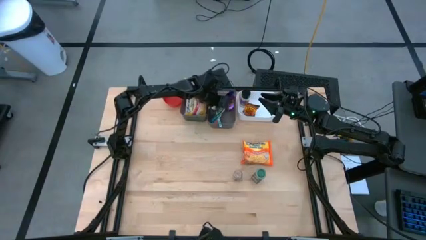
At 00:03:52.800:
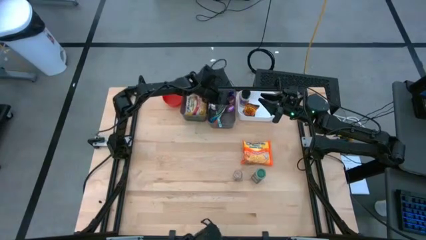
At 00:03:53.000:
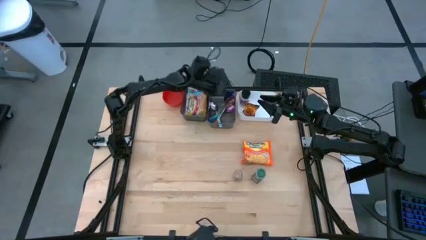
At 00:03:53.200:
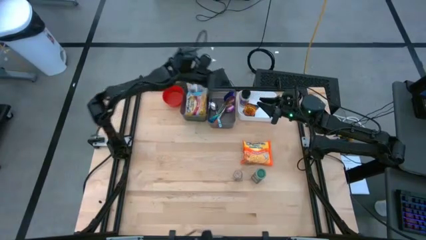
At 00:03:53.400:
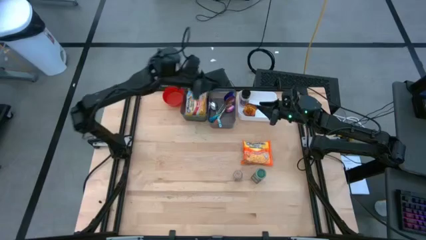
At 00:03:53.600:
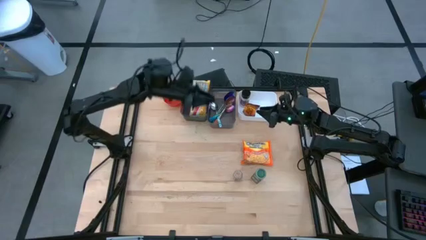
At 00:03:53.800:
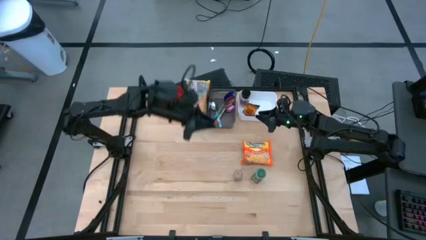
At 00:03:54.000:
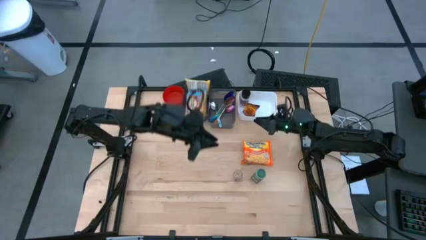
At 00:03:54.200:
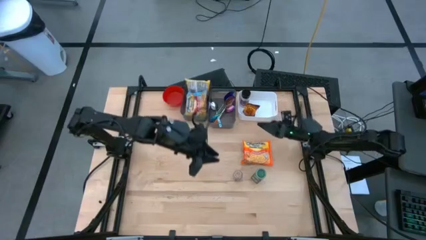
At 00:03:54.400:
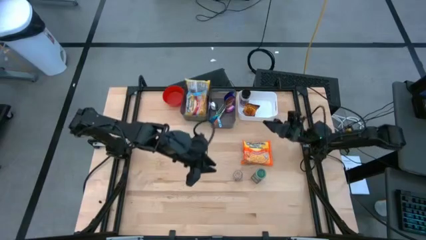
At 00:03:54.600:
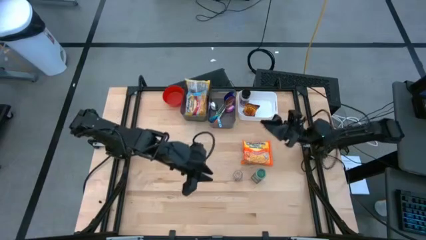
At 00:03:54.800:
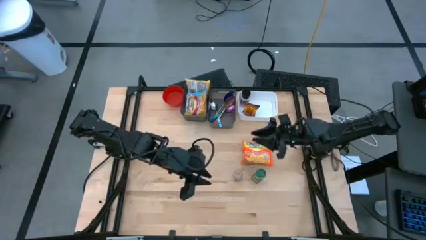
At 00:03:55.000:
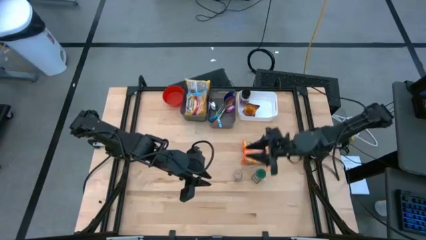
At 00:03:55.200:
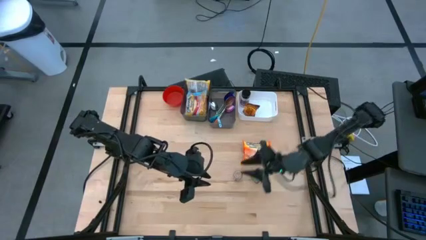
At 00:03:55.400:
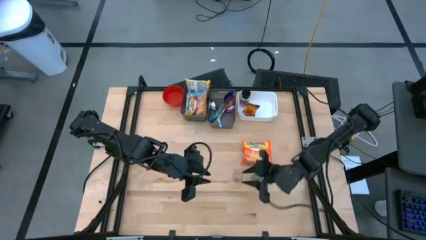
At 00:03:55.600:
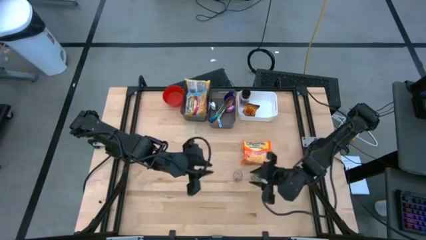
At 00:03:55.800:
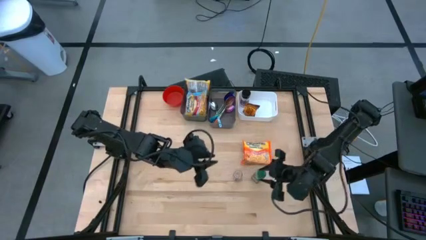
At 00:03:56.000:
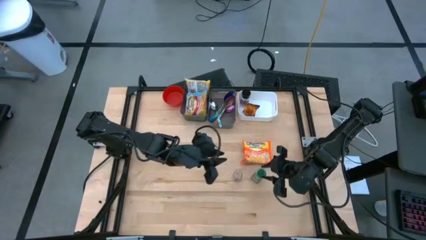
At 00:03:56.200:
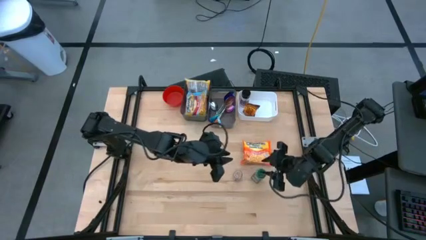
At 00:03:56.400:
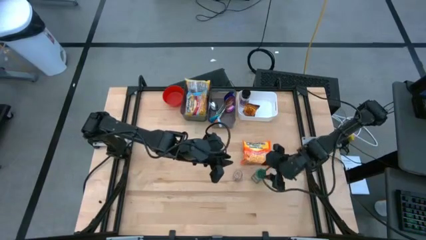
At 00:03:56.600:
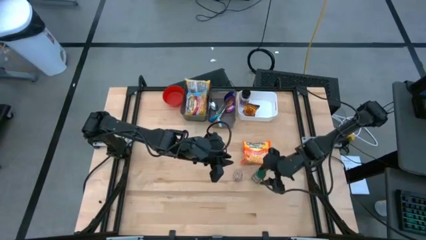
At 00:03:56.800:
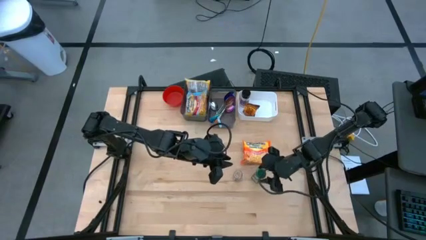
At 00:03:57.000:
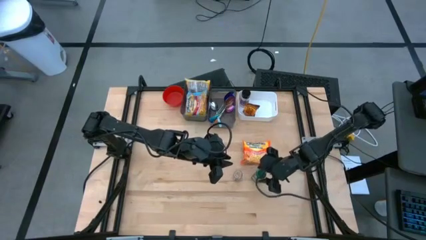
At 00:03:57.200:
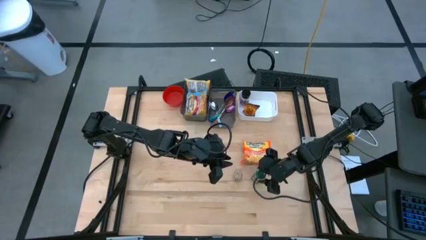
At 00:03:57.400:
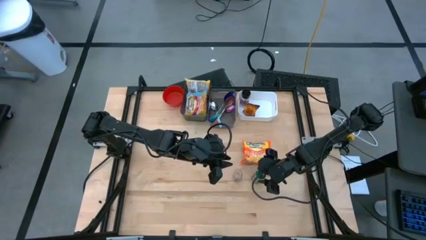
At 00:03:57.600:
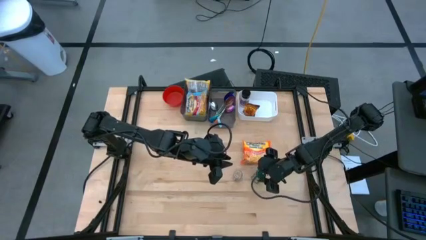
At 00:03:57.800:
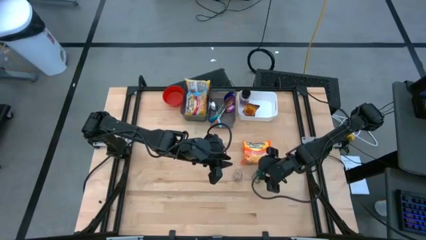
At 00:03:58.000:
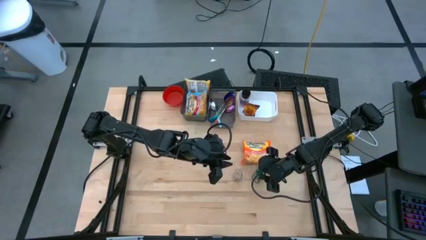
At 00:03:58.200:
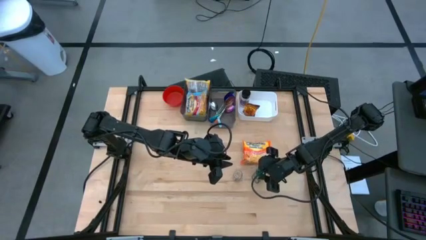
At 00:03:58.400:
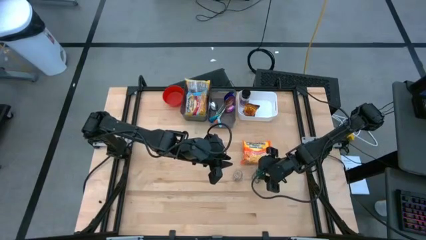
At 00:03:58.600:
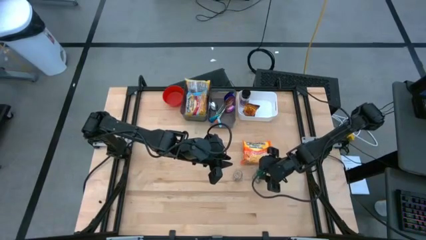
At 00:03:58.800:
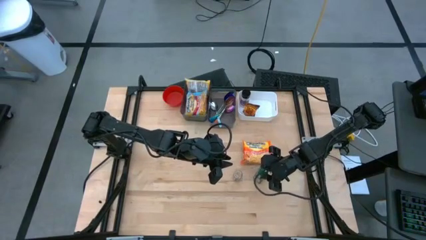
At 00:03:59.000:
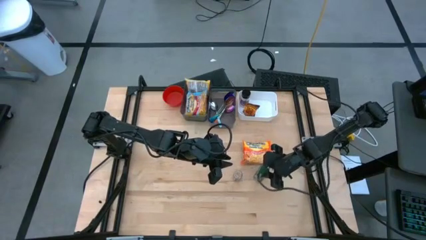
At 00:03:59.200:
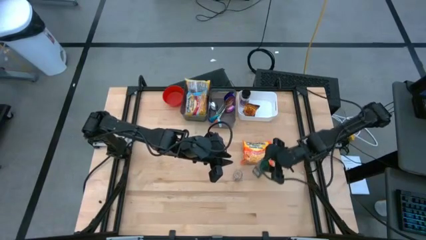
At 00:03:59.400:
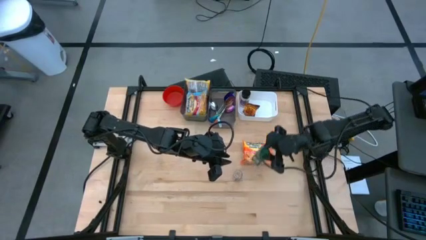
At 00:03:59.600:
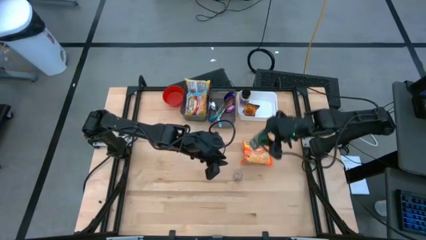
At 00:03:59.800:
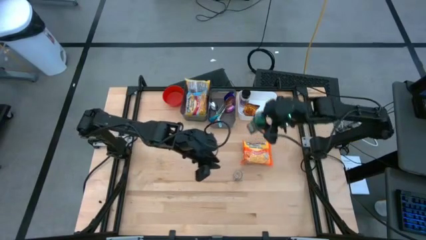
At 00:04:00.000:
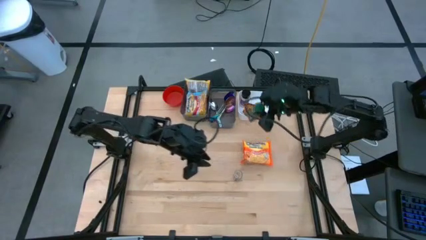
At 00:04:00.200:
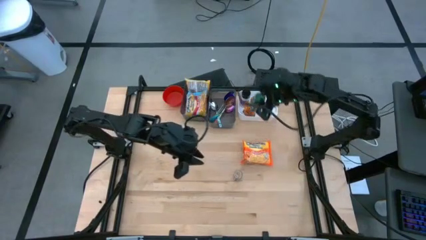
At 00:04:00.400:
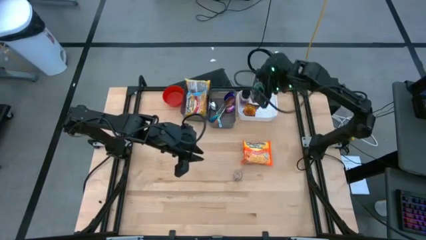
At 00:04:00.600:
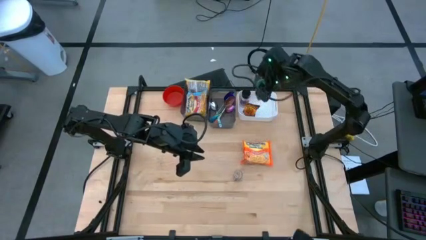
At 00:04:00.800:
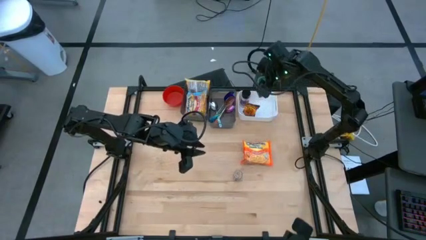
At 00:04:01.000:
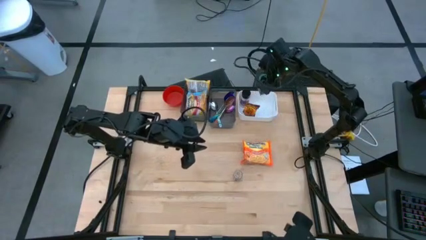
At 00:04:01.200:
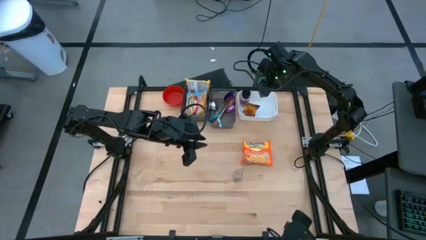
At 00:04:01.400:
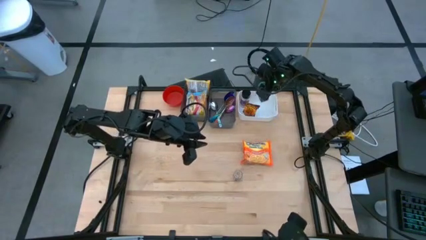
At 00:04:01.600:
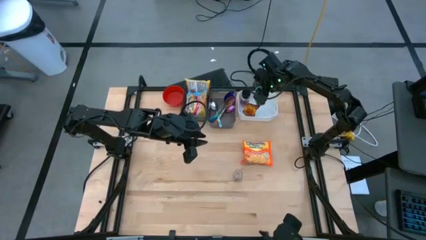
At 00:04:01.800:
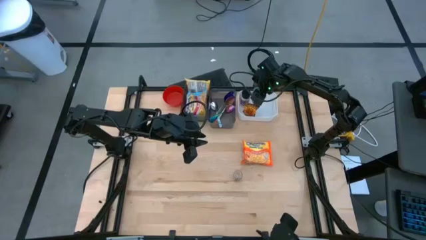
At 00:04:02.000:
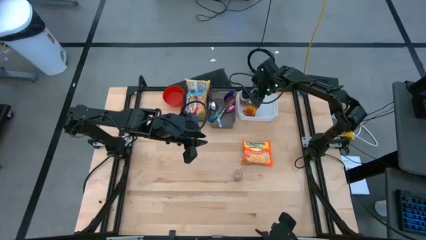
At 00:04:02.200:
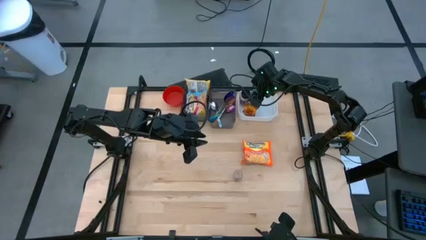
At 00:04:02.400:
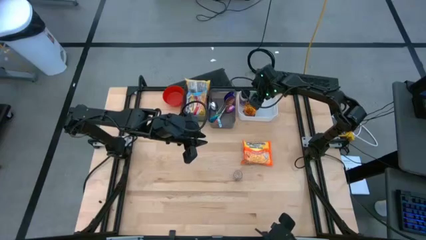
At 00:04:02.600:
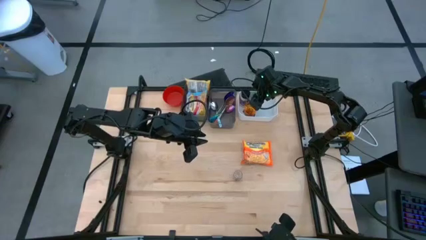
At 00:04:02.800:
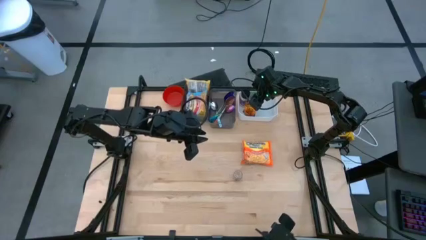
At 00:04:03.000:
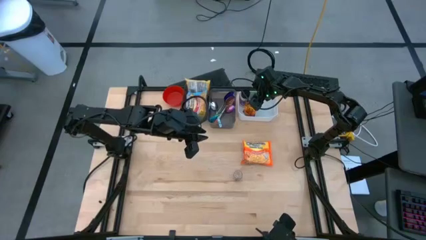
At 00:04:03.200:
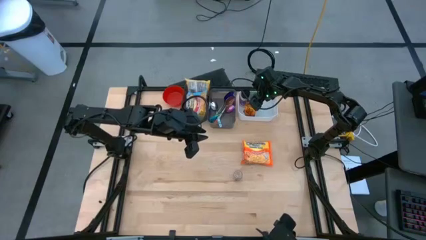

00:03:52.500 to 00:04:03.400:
Task: Pick & Place Food Item
Put the green seasoning bottle into the white bin

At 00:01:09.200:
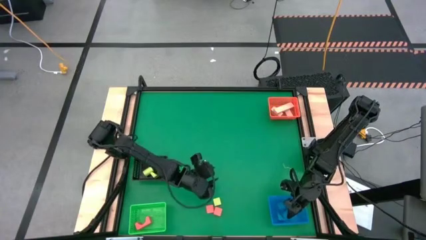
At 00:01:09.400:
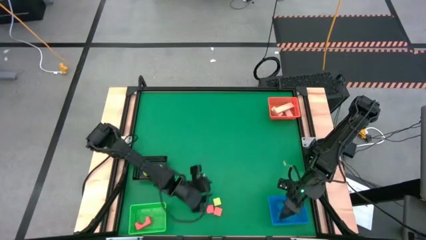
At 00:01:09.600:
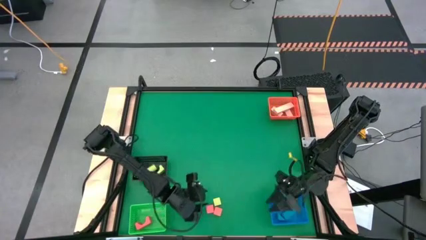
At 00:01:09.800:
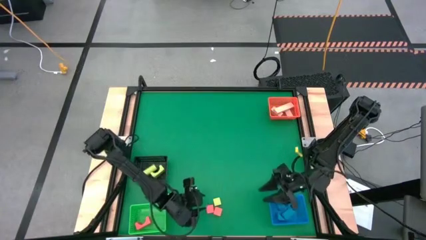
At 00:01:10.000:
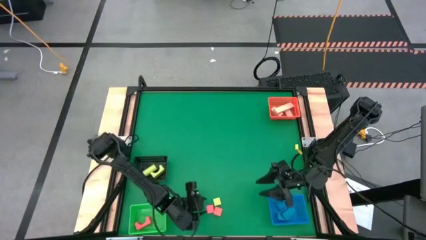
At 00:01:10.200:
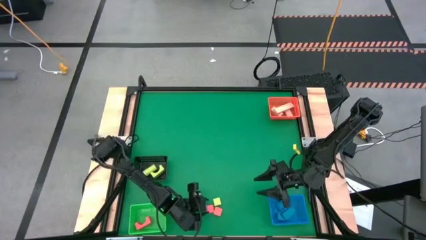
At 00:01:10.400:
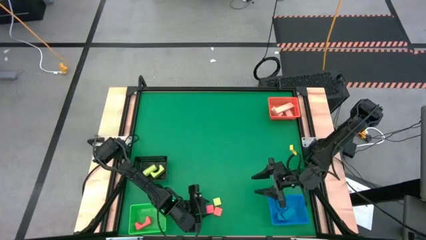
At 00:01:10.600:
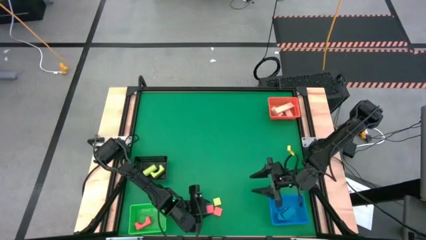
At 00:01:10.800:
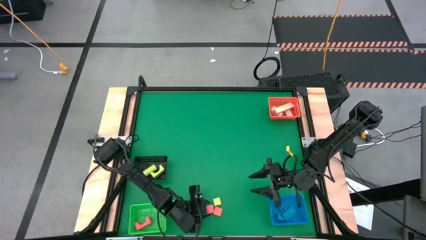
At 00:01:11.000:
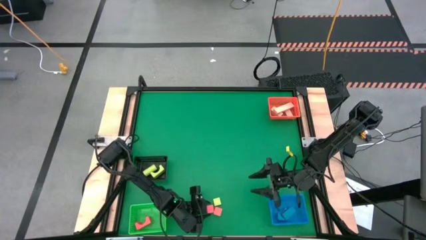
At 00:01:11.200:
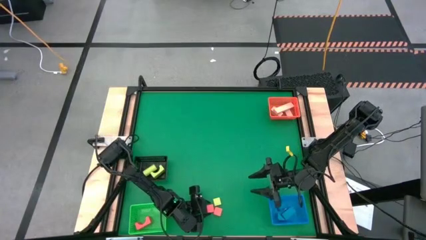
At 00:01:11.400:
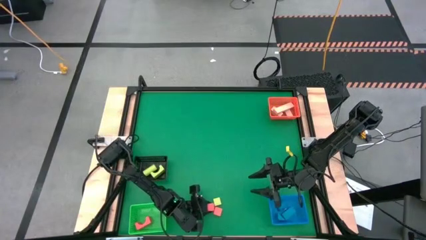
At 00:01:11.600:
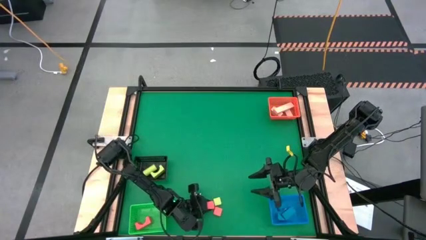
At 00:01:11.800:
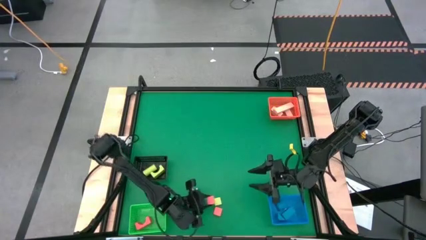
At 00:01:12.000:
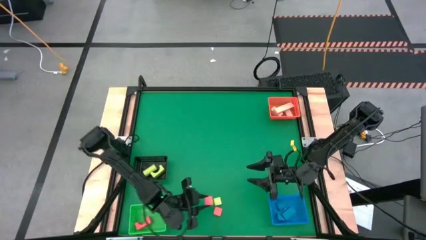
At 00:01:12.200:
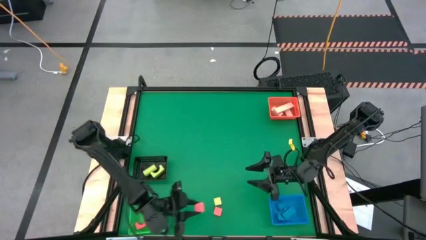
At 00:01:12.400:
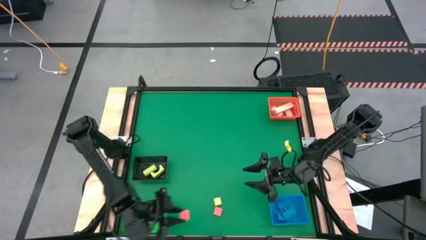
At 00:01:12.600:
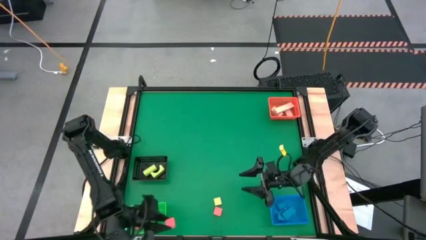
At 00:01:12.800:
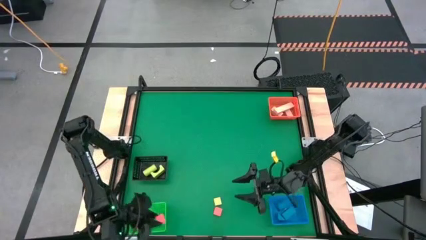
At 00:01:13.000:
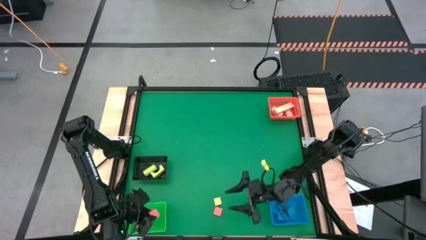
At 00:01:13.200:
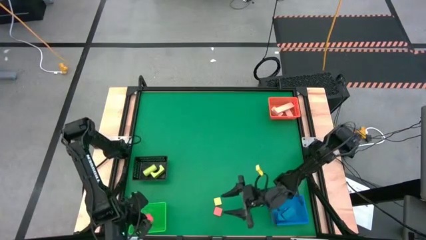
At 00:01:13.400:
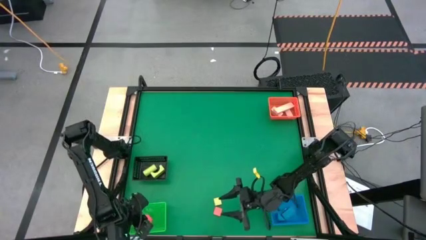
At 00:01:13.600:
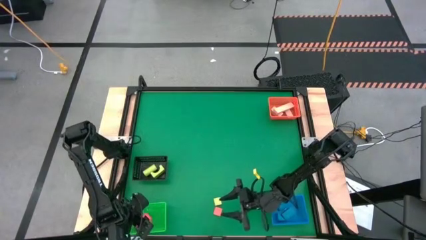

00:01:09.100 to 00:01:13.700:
Task: Sort & place blocks by color
Put the left orange wooden block into the green basket
